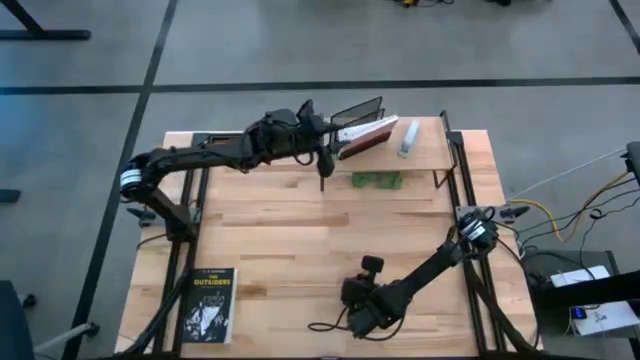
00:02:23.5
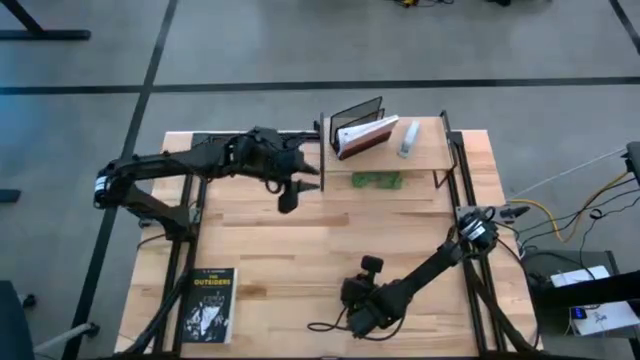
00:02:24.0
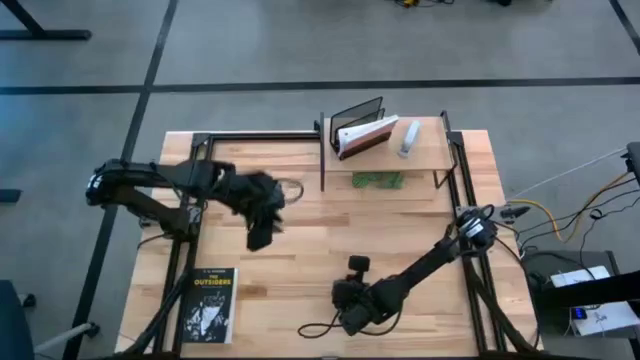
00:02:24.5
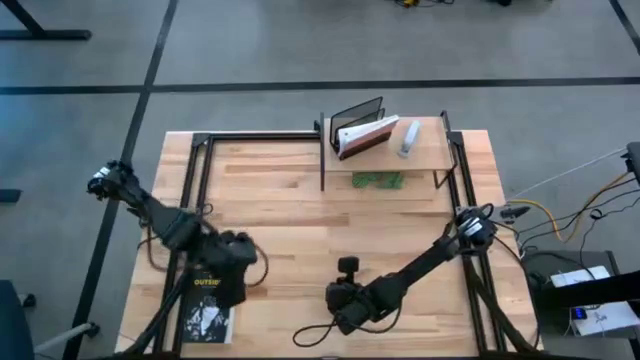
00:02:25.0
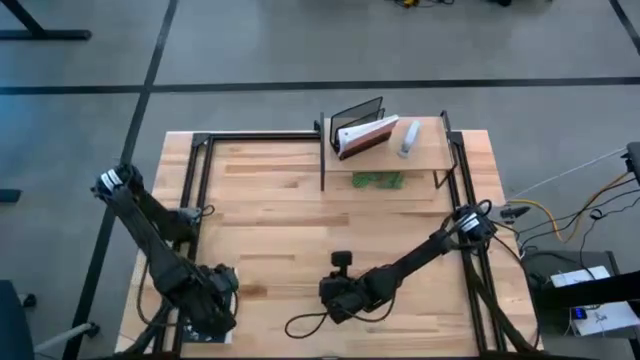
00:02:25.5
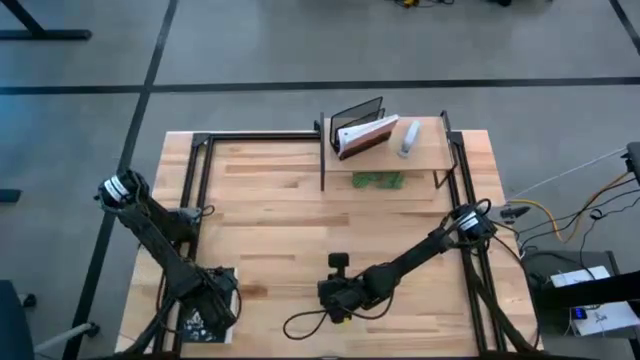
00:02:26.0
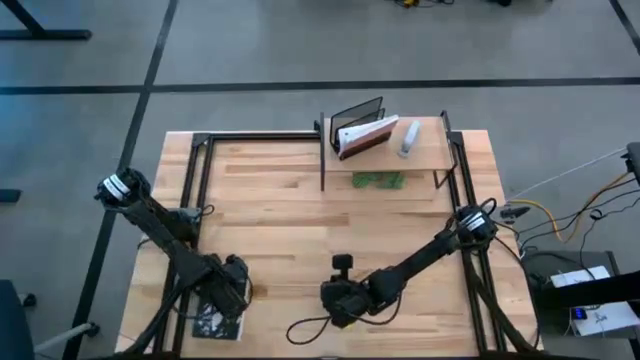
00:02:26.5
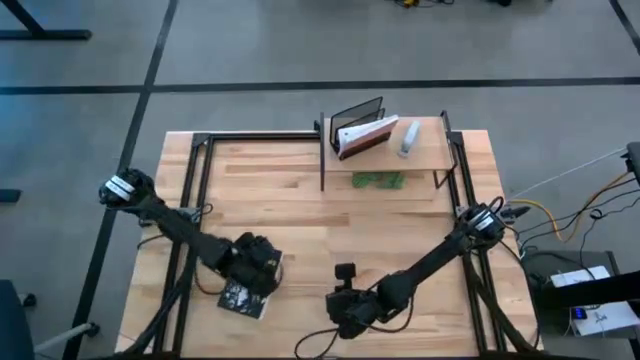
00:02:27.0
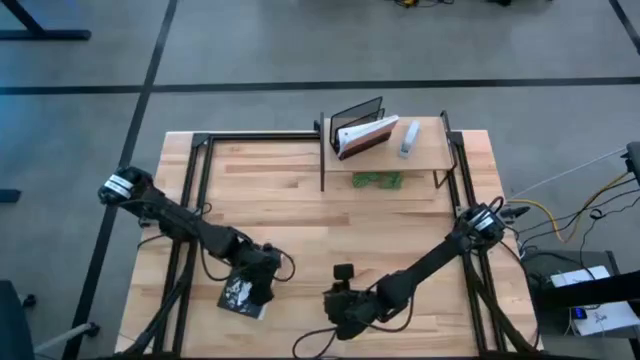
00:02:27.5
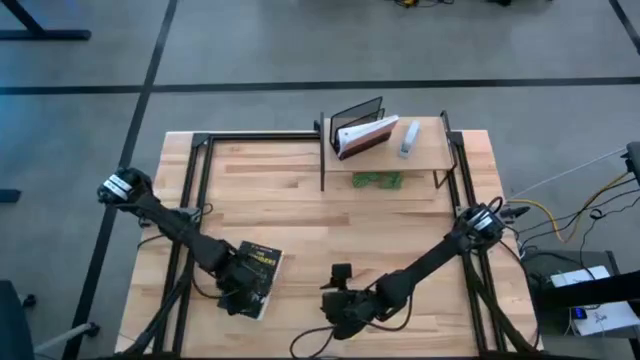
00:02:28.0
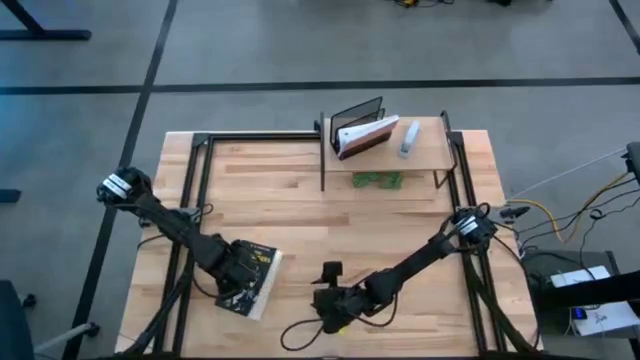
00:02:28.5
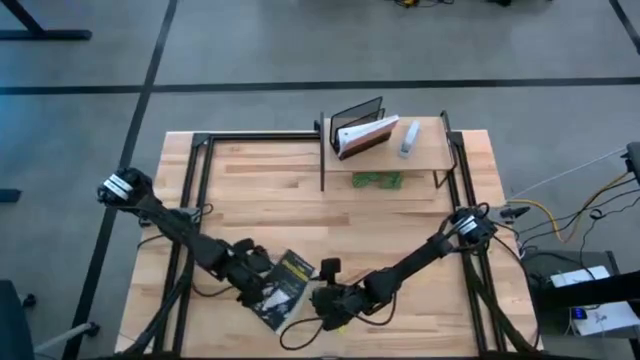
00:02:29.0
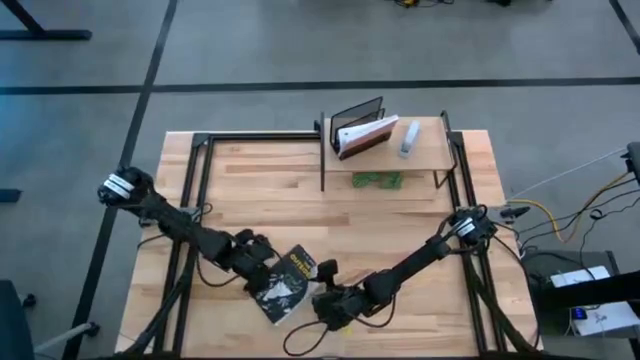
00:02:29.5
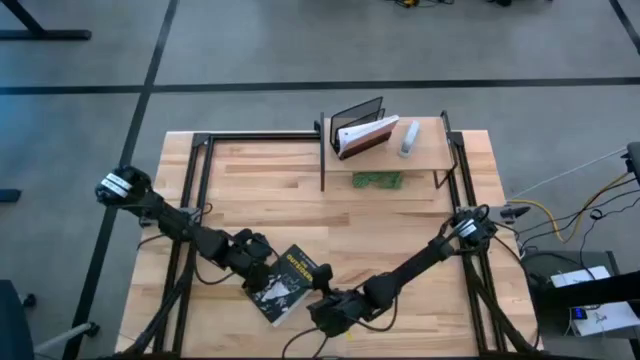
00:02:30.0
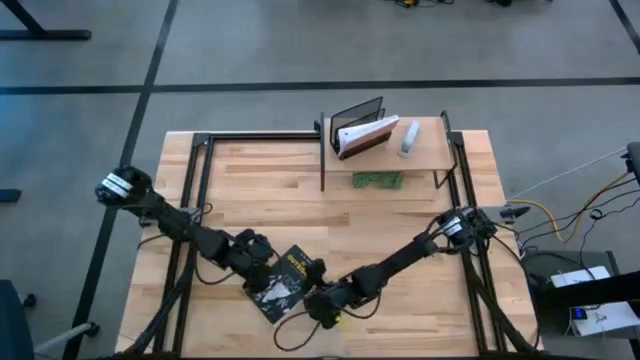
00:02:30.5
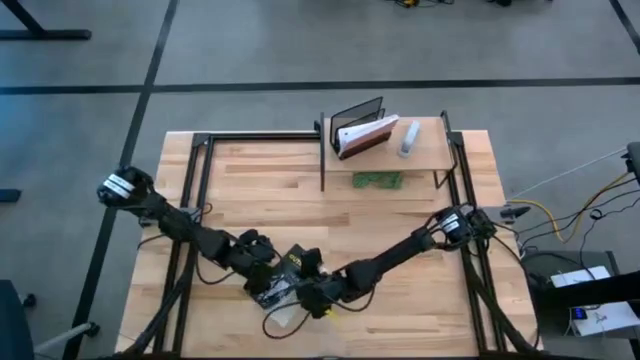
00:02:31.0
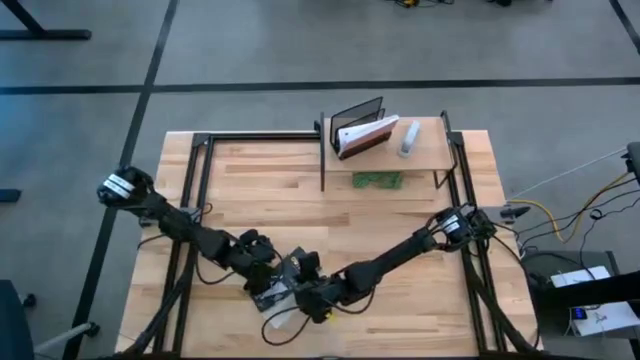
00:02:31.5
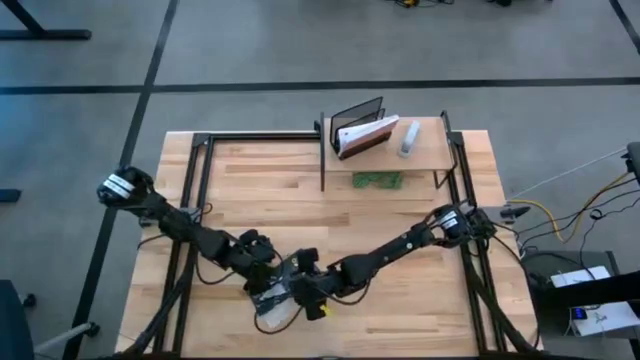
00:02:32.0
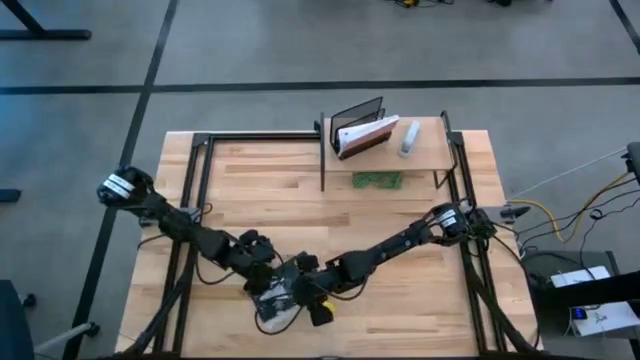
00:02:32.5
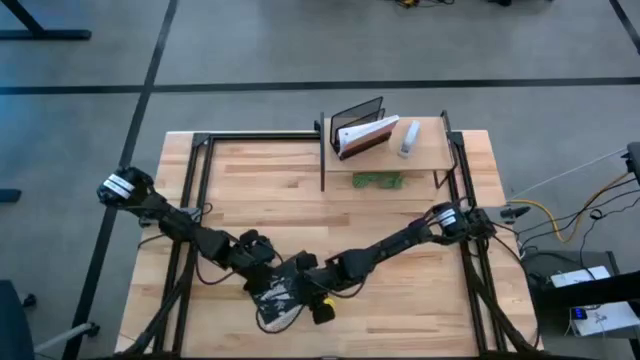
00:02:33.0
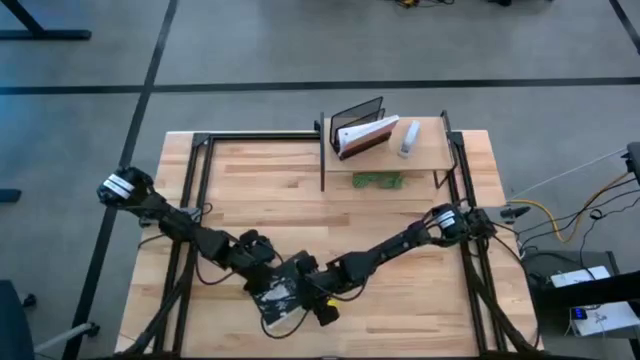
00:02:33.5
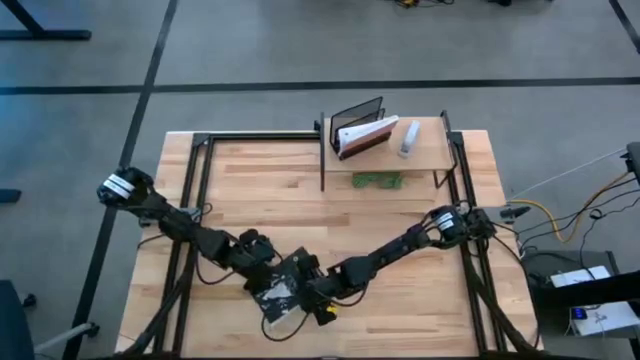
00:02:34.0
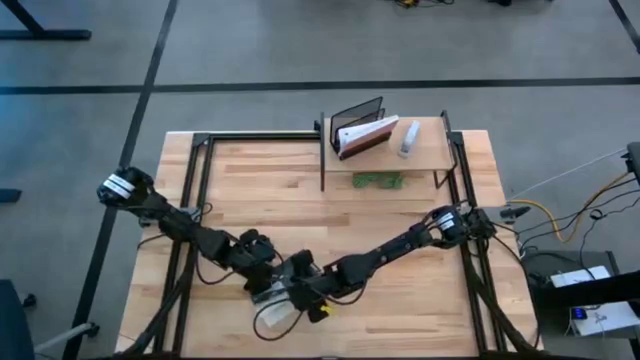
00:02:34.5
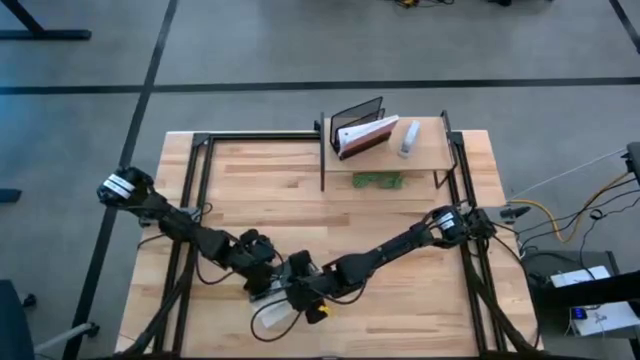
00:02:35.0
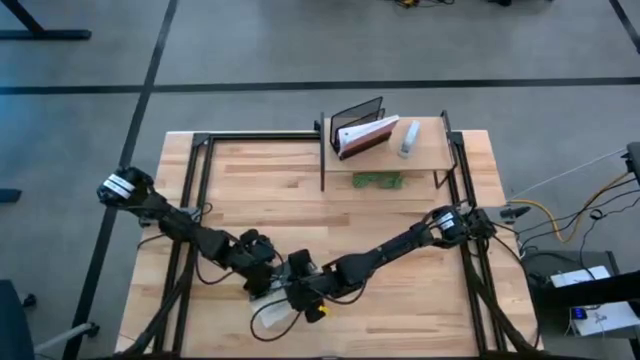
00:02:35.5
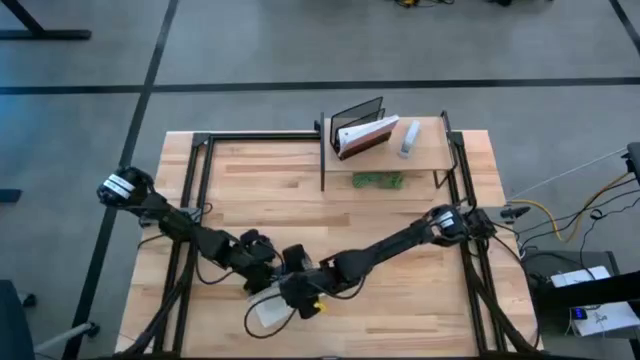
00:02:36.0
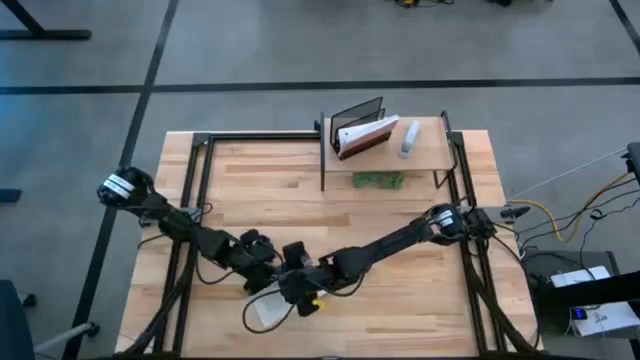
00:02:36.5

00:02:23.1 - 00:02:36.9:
Task: Stock shelves
Put the black book into the black desk organizer on the shelf

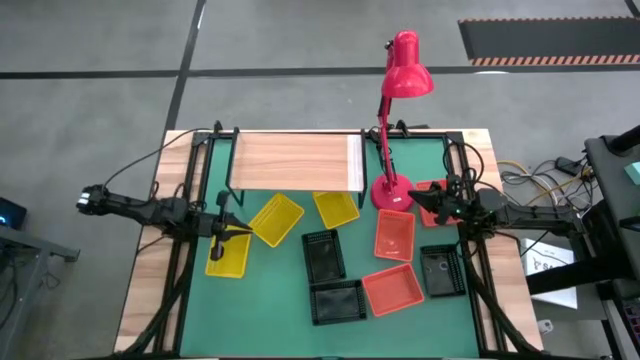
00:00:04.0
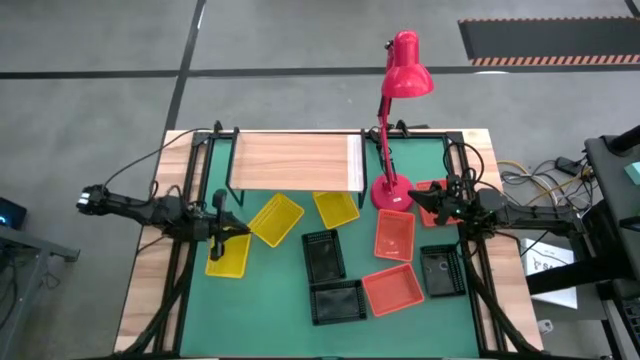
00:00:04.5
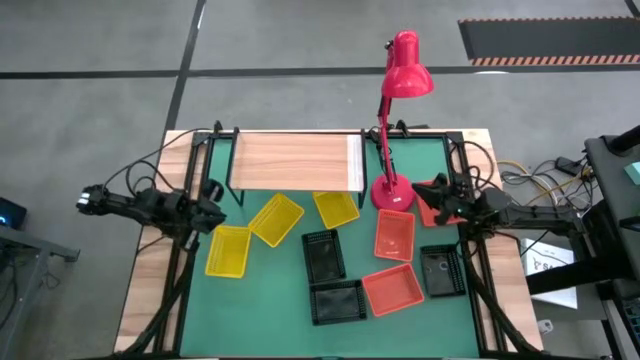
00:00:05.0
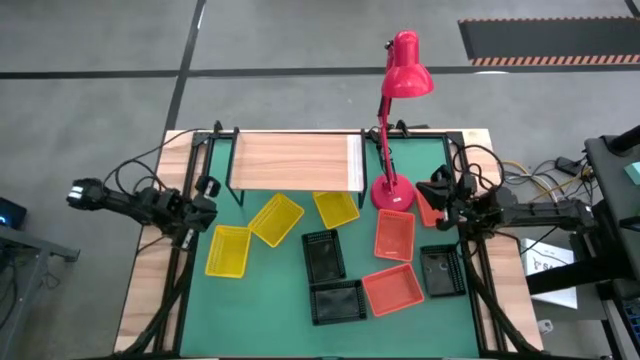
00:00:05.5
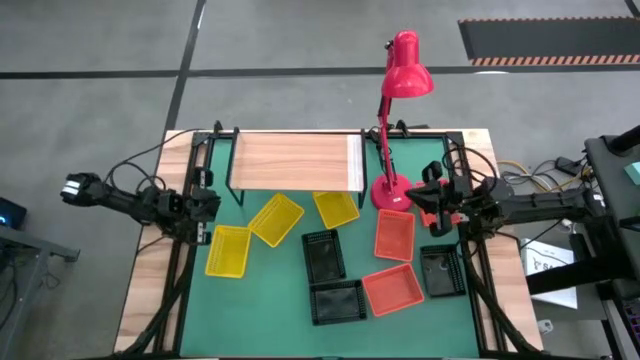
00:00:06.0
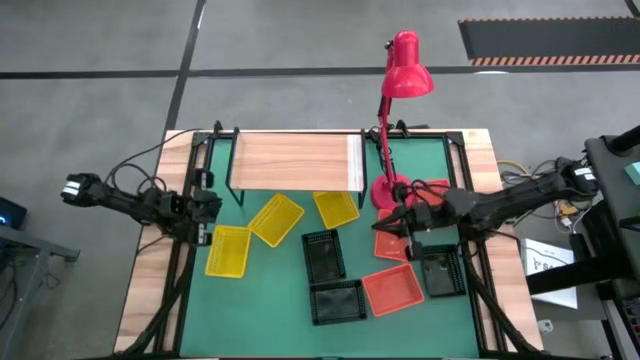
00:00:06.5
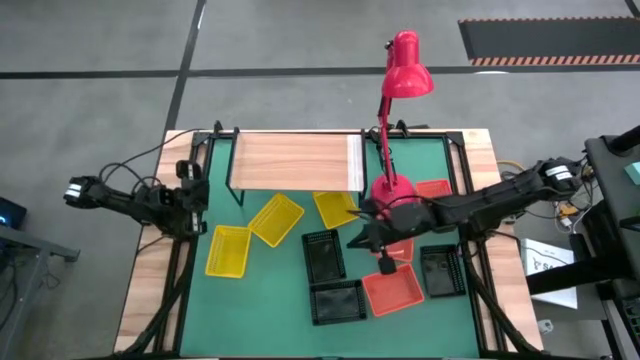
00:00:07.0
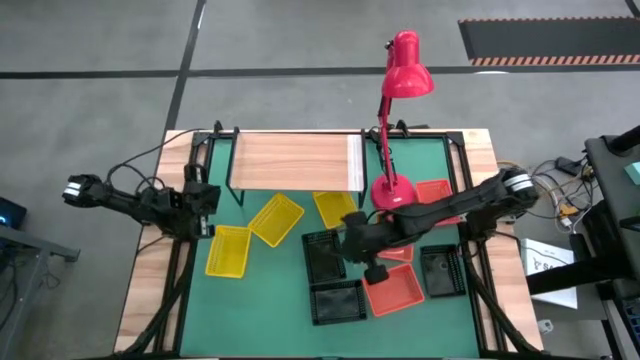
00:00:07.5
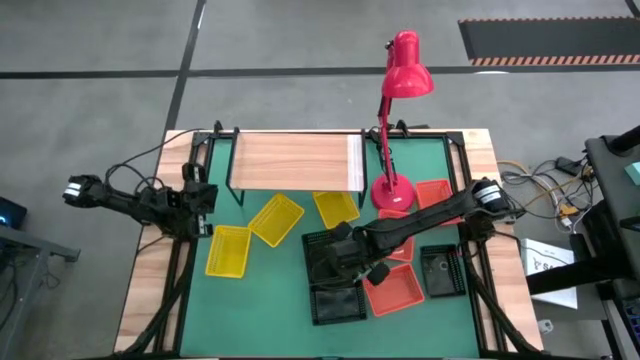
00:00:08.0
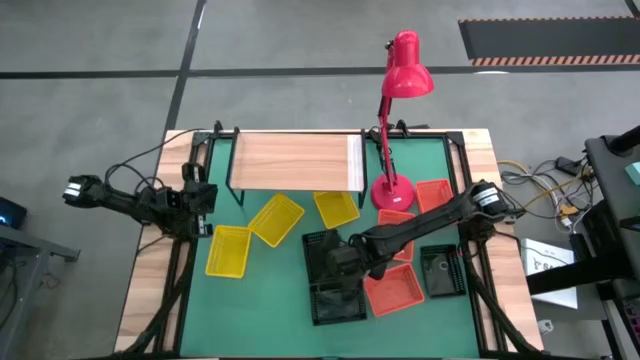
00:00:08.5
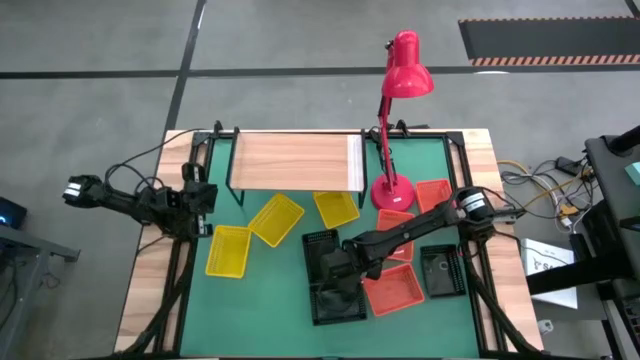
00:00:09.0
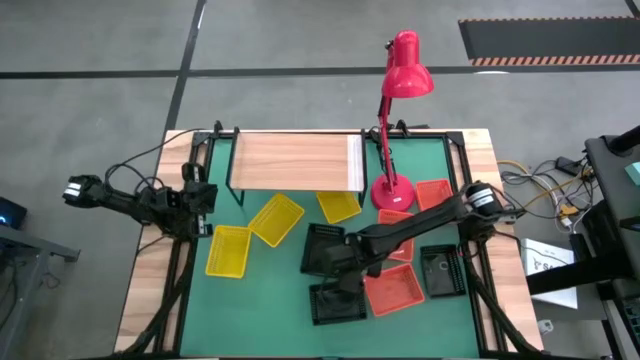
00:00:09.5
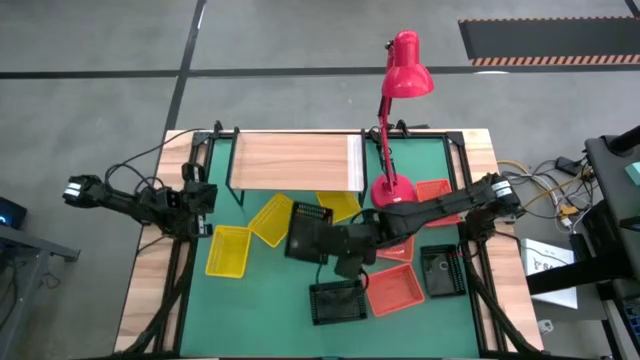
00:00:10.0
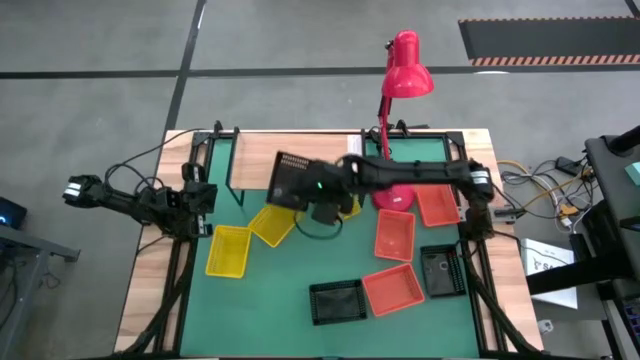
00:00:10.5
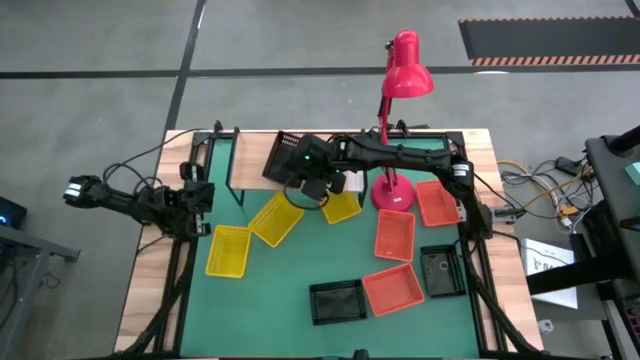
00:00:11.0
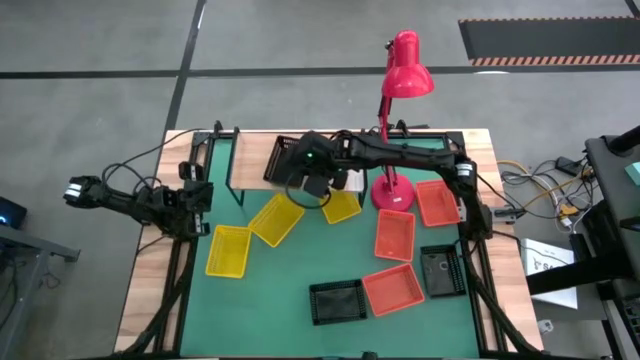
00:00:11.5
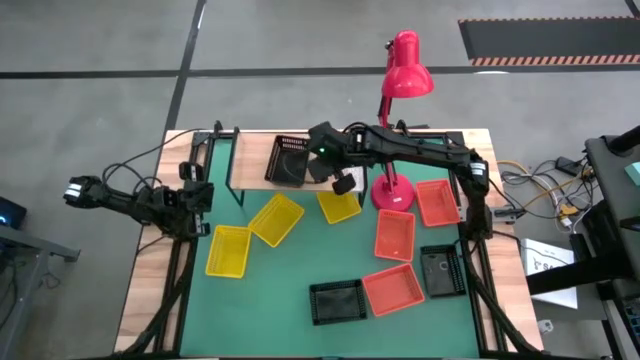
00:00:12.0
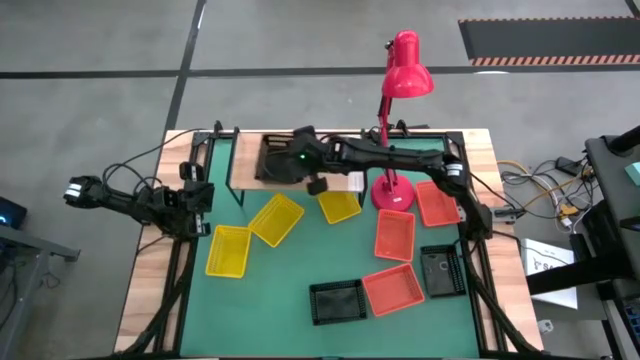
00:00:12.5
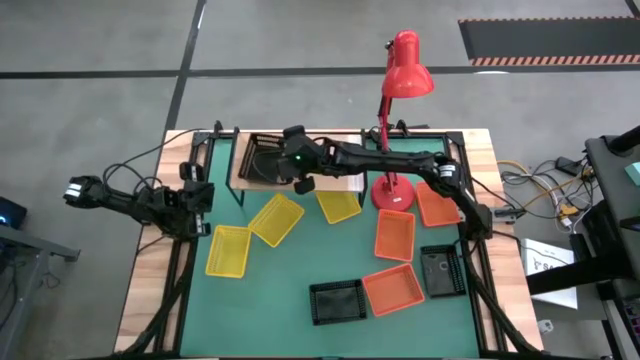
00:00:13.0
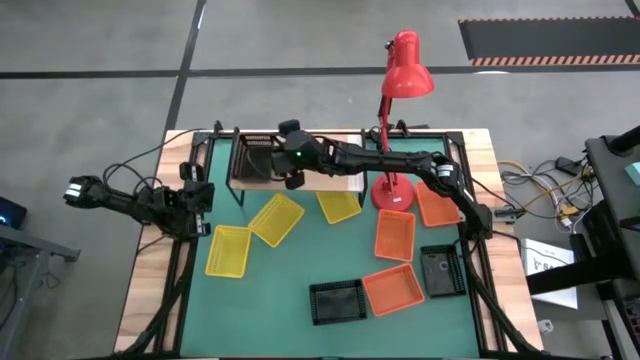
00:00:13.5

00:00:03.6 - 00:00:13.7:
Task: Stack baskets on shelf by color
Put the top black bin on the shelf
